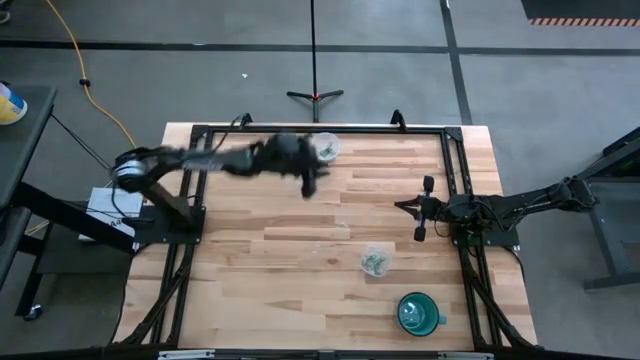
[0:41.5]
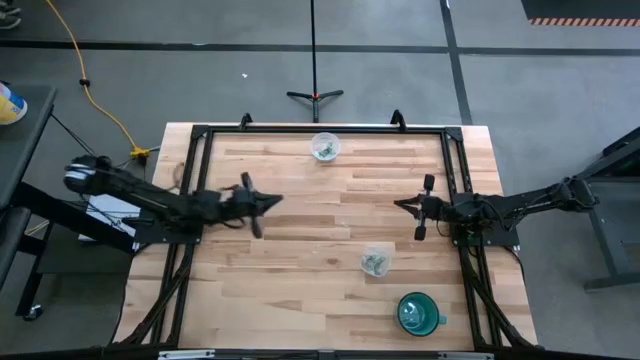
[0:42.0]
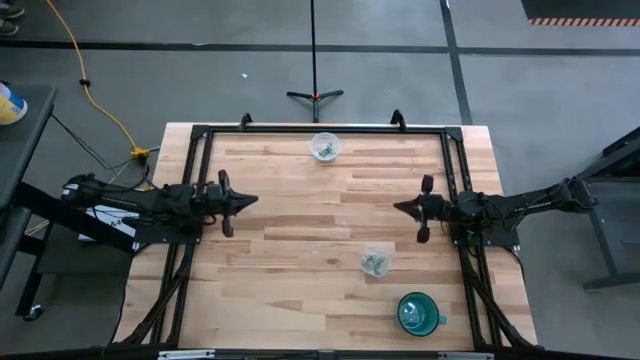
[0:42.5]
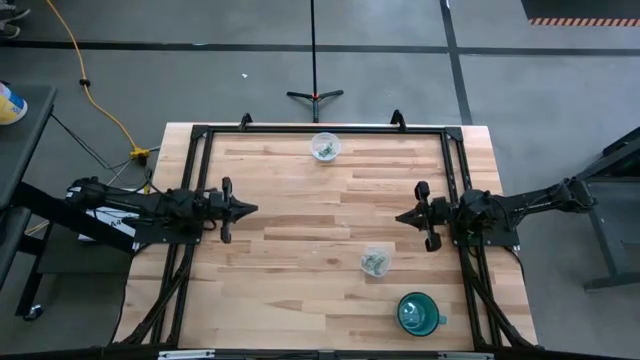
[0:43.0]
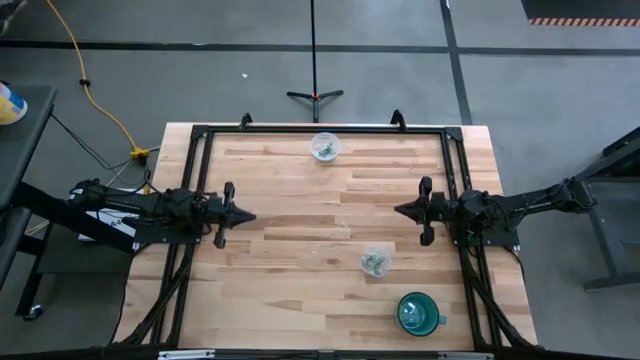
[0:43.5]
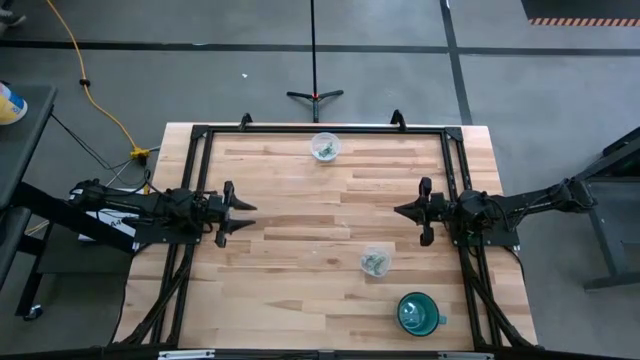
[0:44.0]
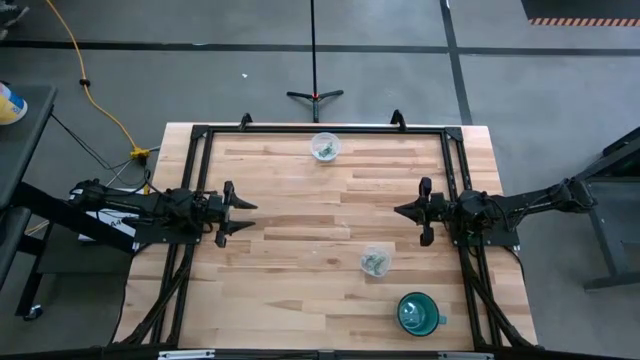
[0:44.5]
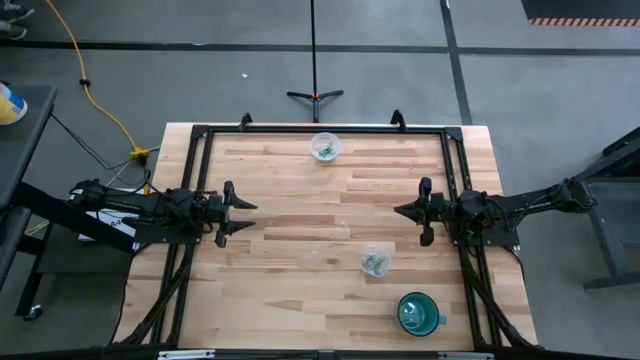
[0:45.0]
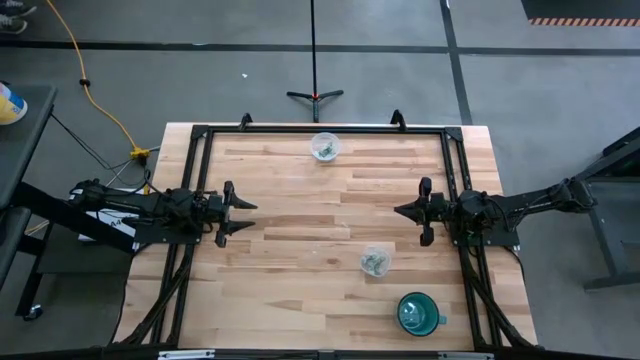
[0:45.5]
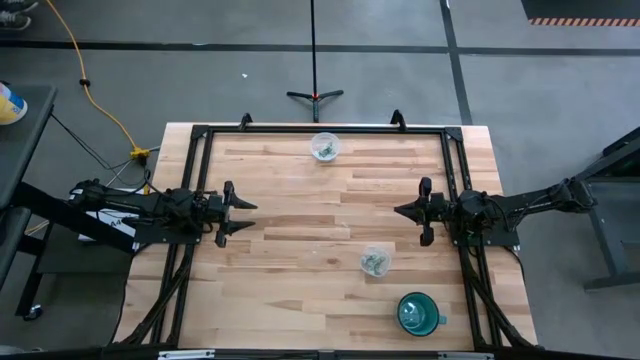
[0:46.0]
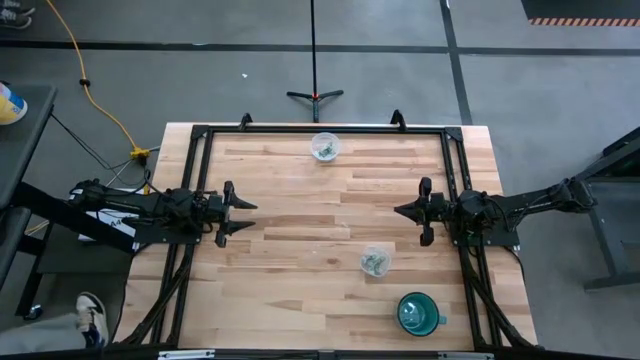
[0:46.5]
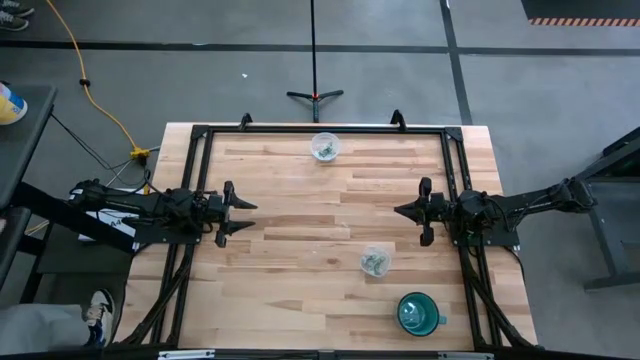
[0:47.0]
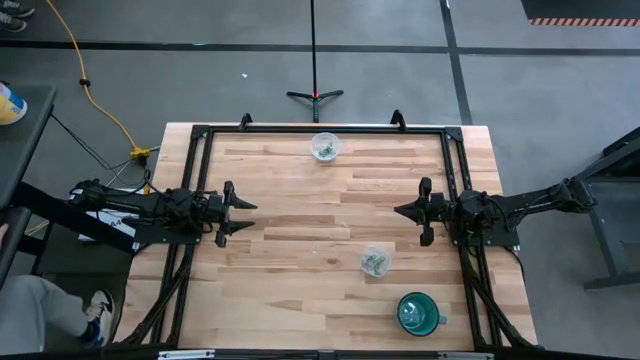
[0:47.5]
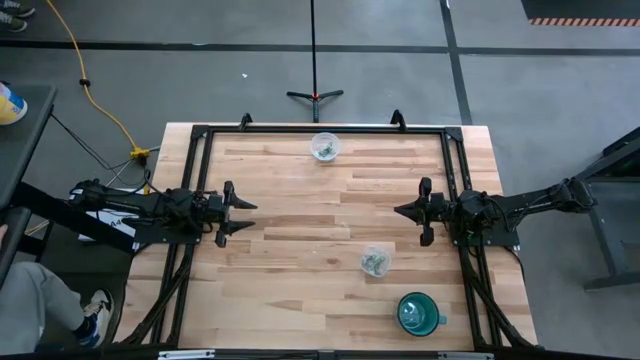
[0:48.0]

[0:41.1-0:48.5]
Task: Pick and place Stevia / Truvia into bins
Return to Home Position

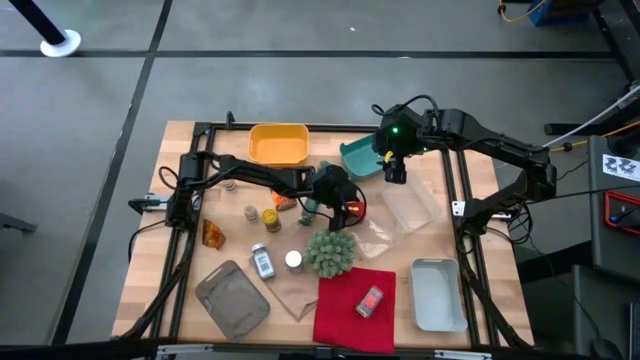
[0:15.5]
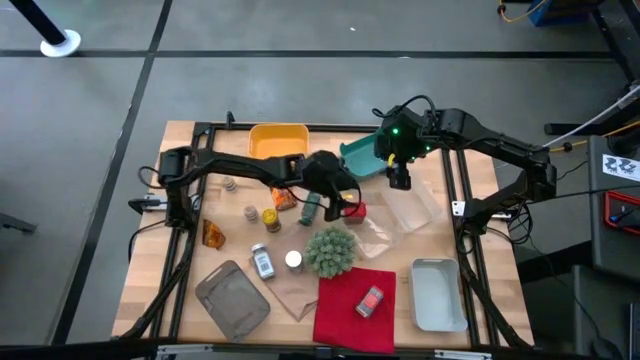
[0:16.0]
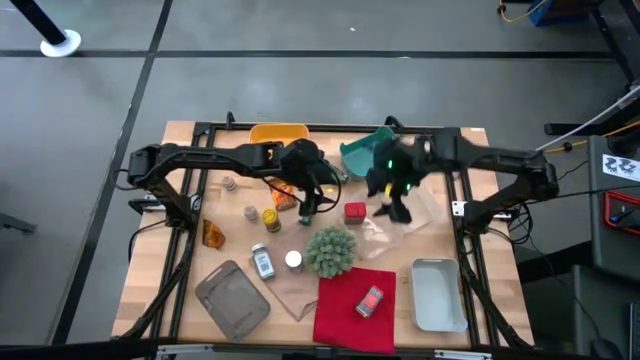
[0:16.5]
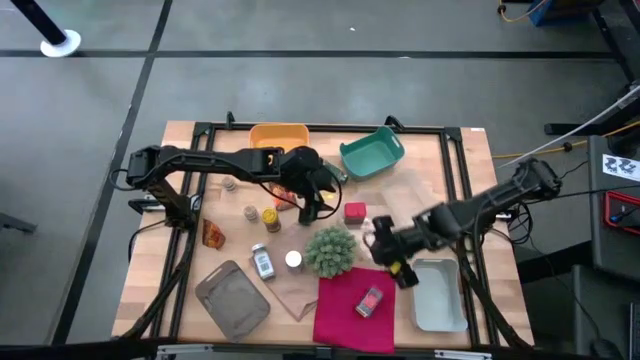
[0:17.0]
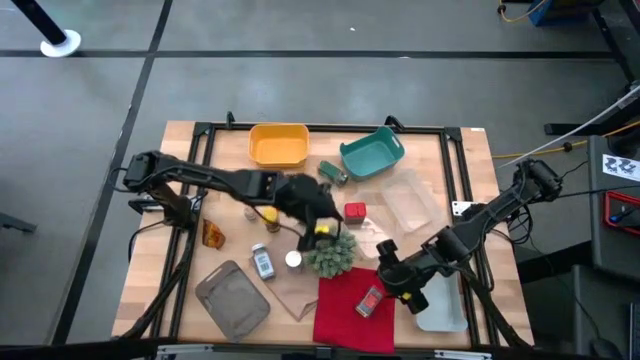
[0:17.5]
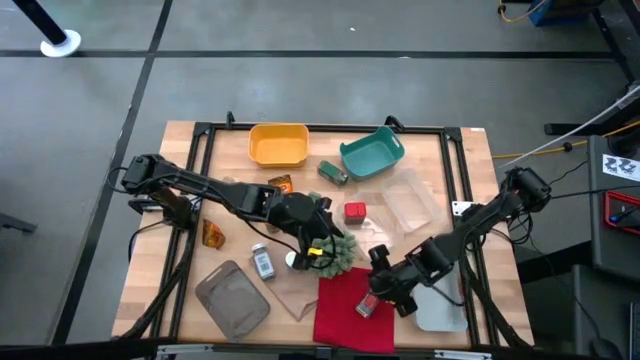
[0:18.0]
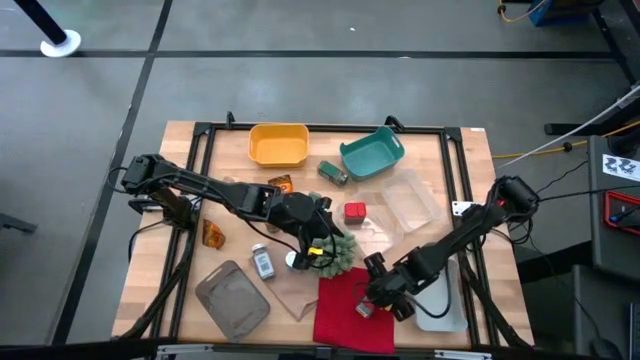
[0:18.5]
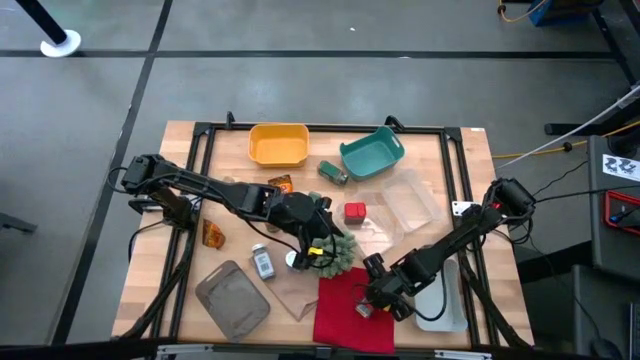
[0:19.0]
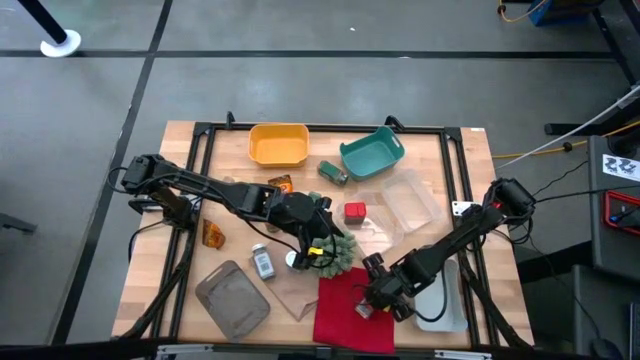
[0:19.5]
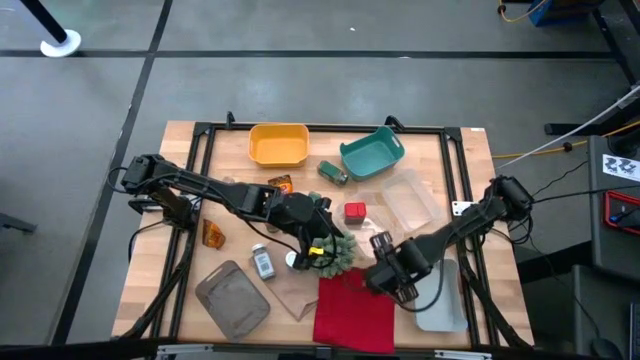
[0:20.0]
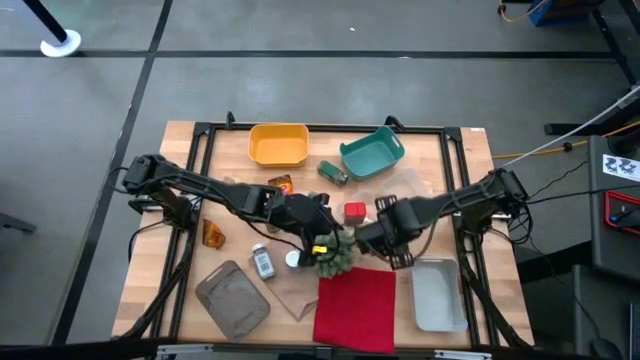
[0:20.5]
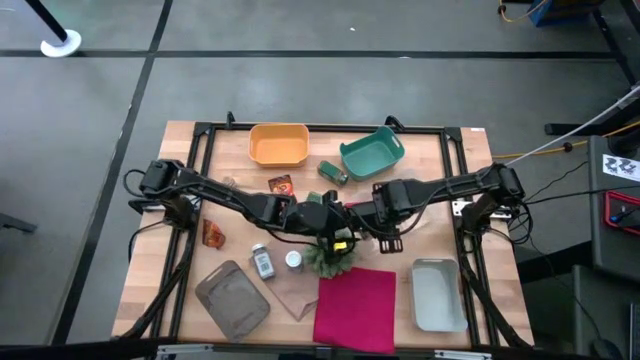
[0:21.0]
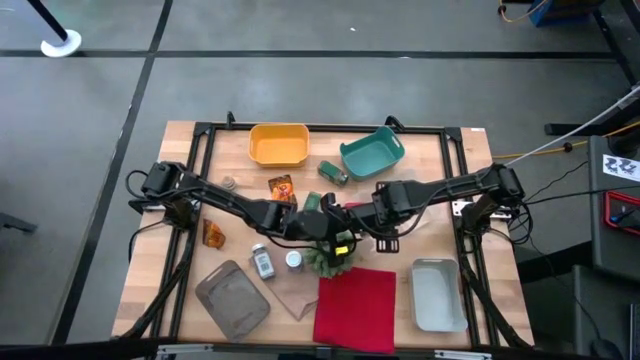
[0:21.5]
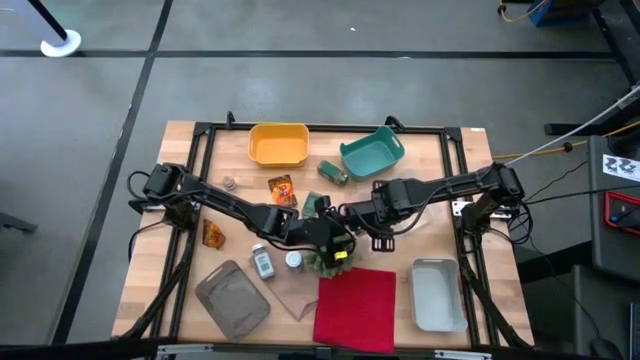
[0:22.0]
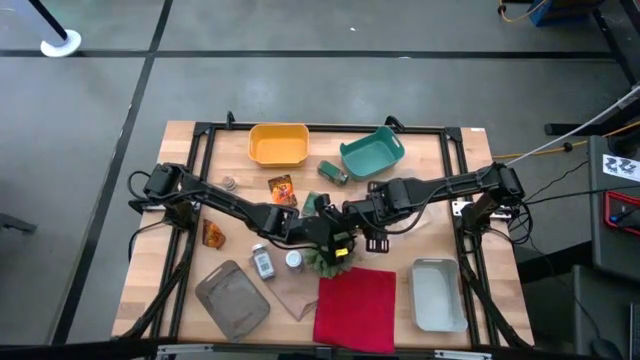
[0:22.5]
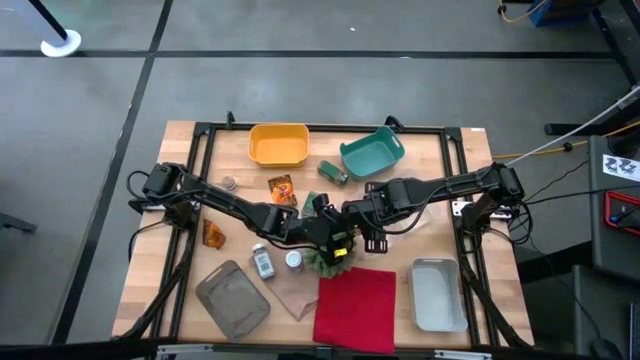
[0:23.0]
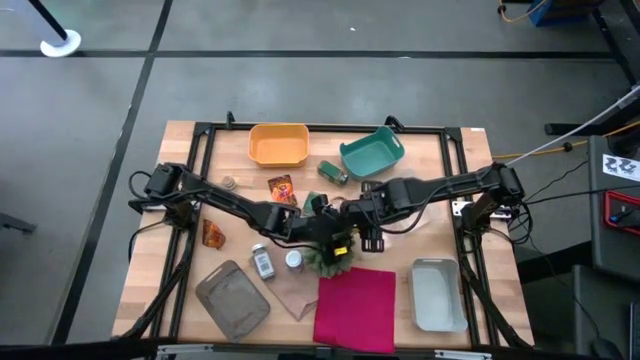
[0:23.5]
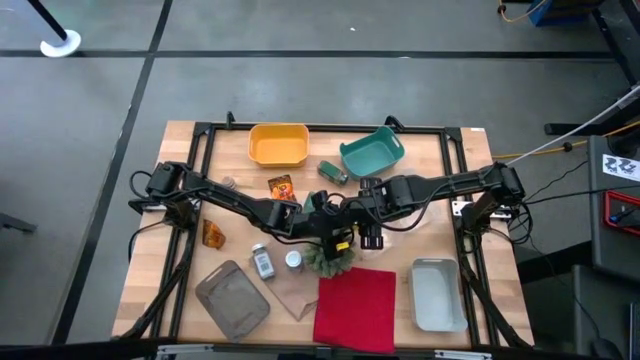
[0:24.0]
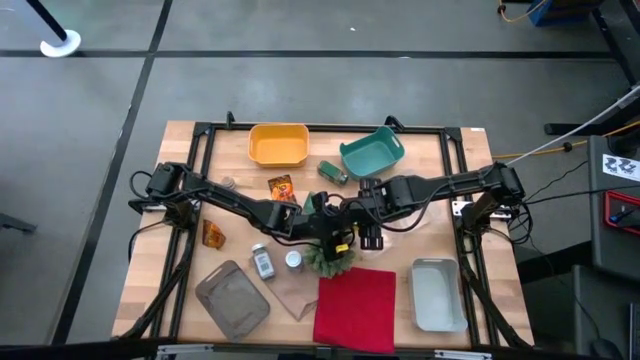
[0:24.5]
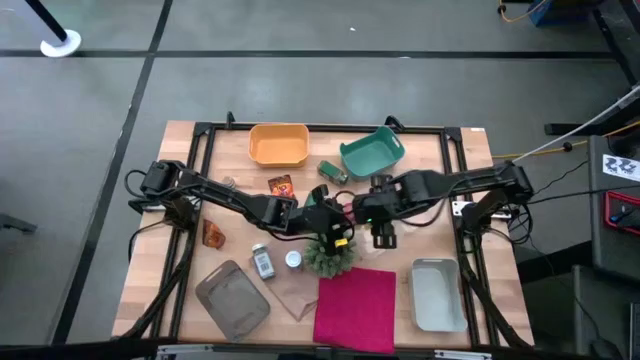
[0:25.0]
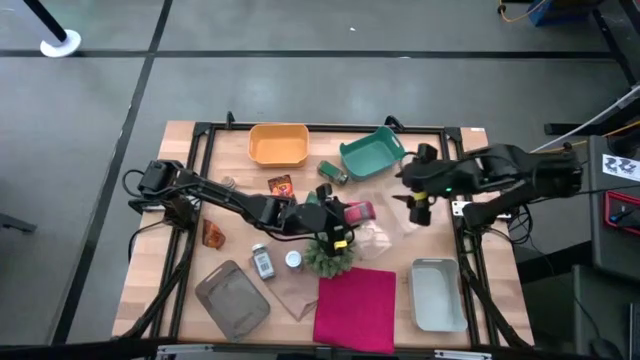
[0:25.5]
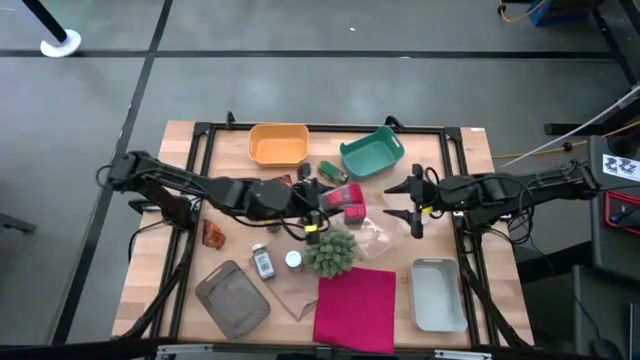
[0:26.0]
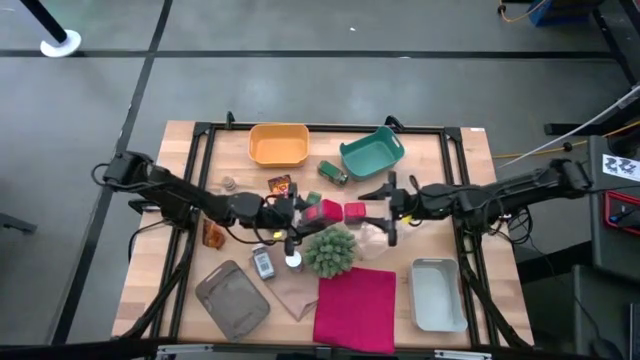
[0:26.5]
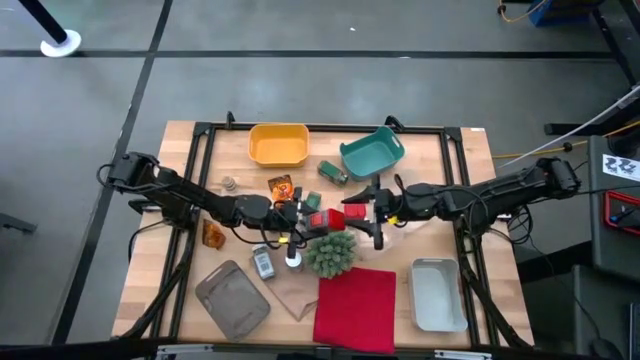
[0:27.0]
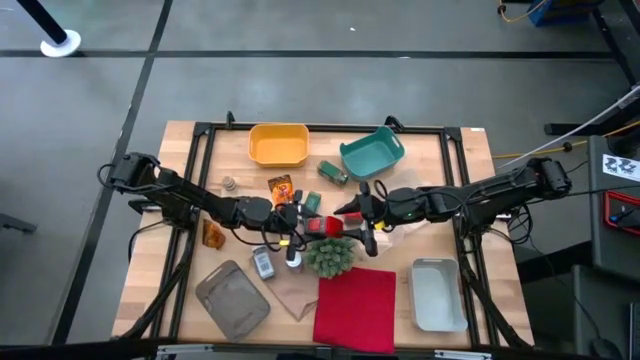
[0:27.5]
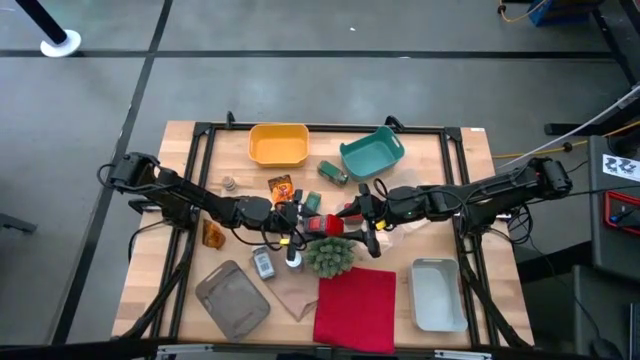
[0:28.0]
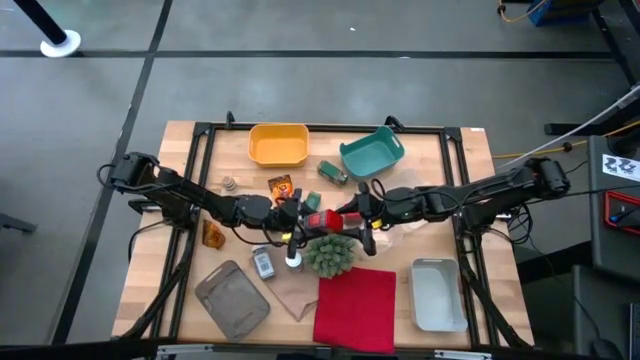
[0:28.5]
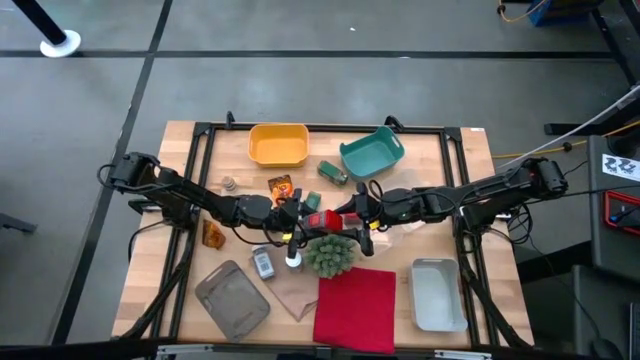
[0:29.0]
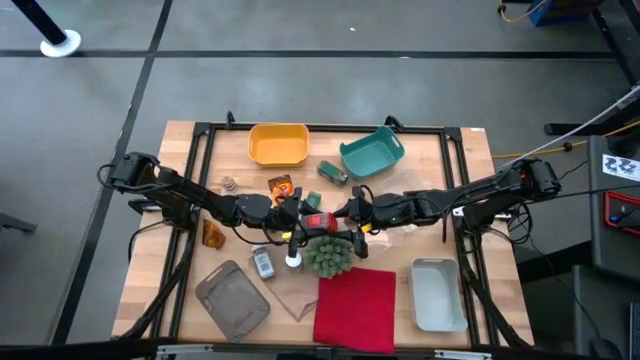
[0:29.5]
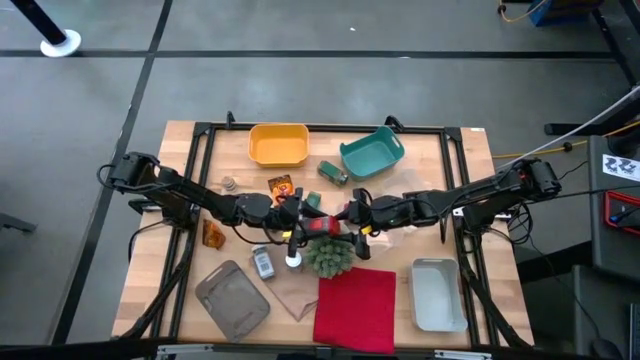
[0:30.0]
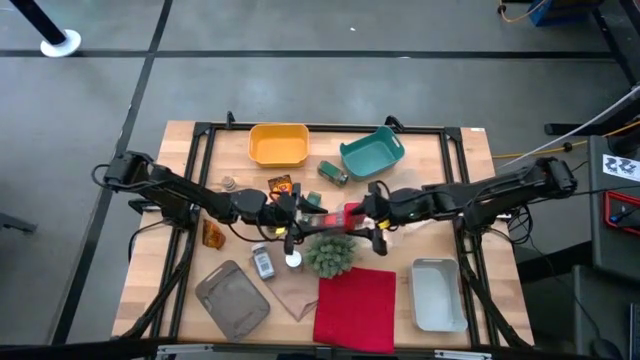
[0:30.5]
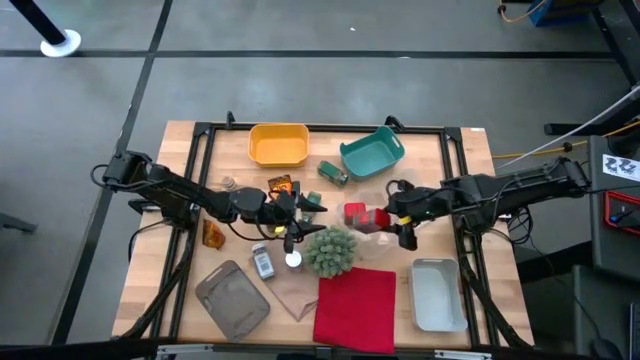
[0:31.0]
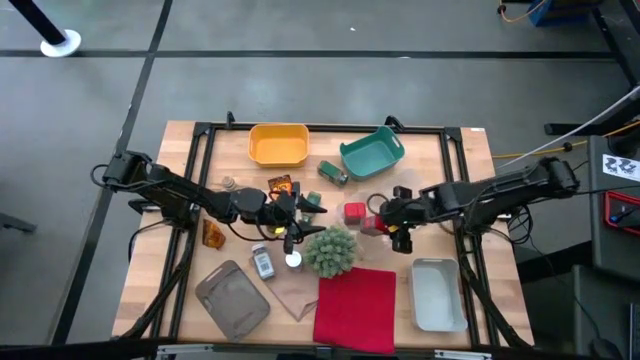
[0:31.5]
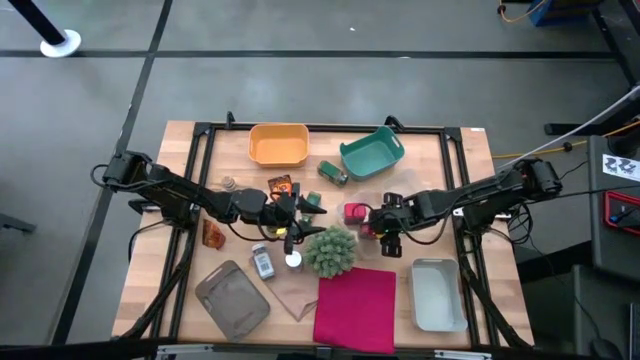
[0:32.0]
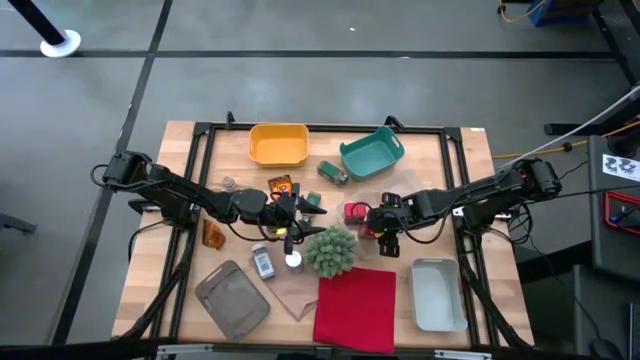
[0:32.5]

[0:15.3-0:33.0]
Task: Sort spices by type
Put the red seasoning can into the left transparent bin
